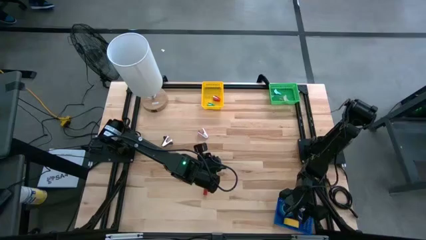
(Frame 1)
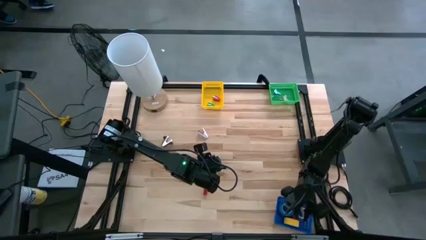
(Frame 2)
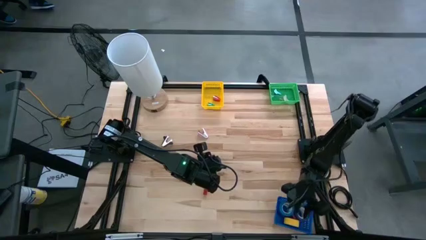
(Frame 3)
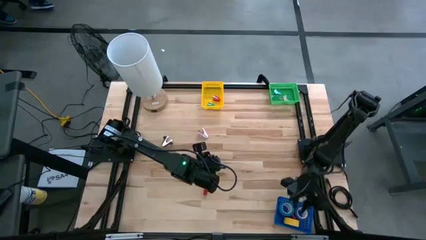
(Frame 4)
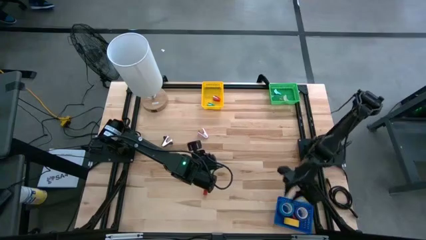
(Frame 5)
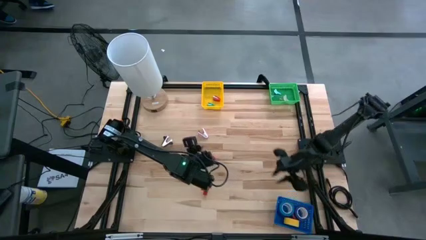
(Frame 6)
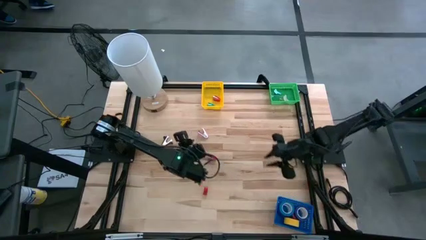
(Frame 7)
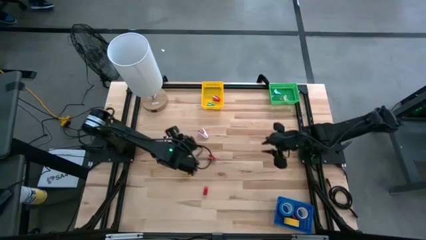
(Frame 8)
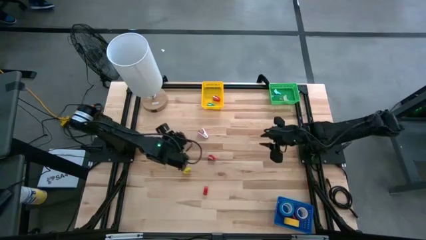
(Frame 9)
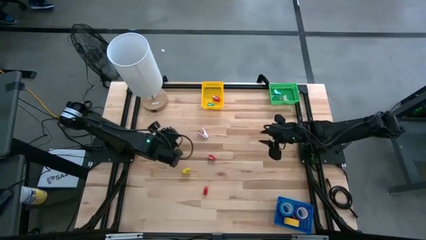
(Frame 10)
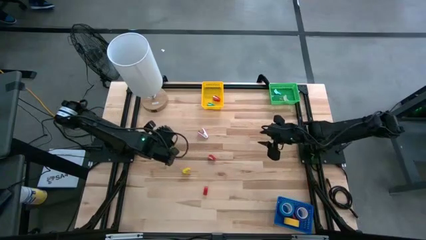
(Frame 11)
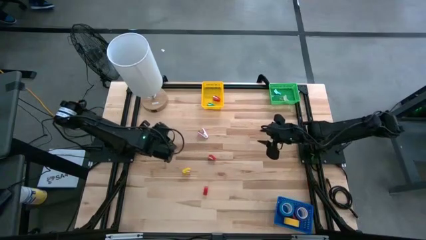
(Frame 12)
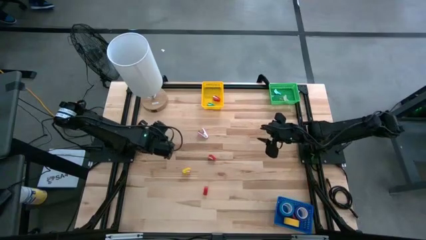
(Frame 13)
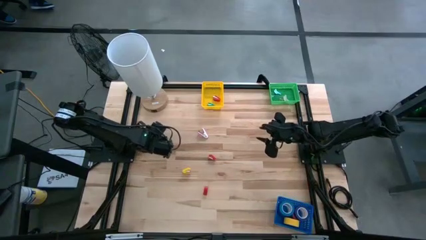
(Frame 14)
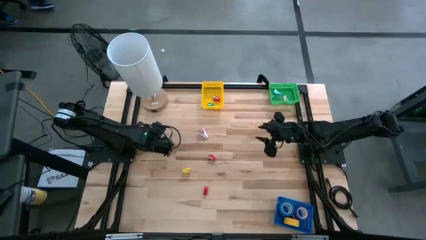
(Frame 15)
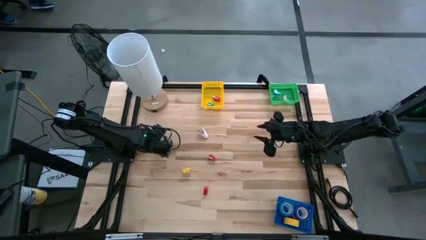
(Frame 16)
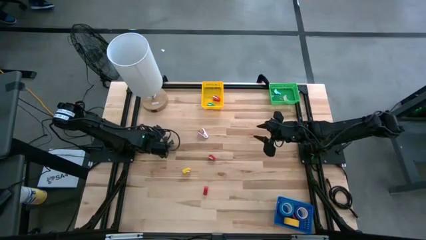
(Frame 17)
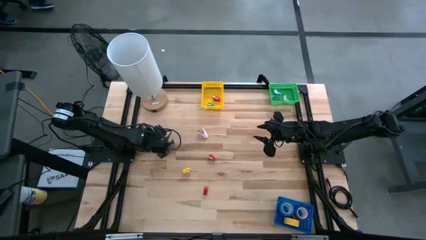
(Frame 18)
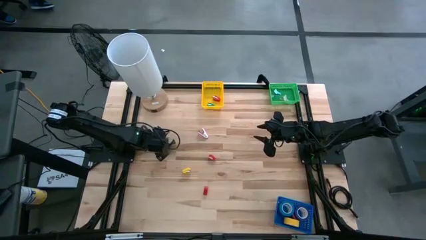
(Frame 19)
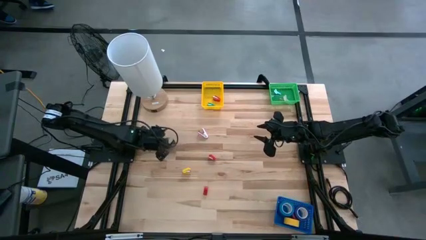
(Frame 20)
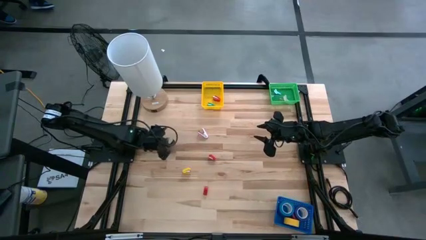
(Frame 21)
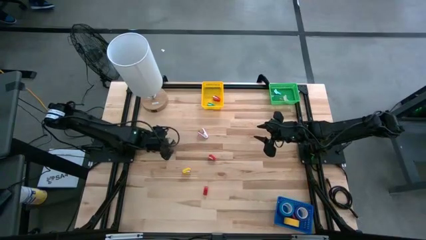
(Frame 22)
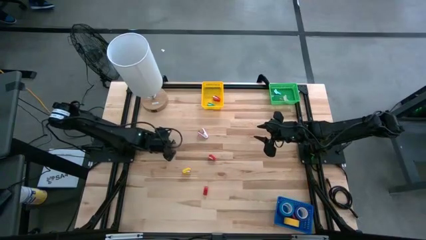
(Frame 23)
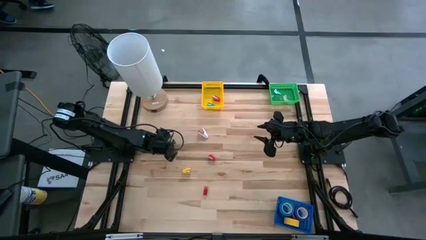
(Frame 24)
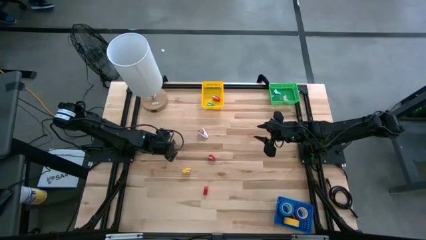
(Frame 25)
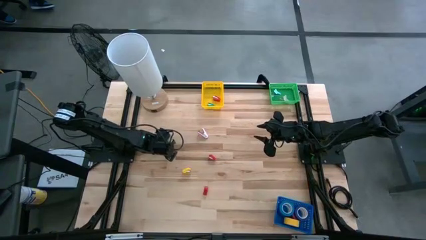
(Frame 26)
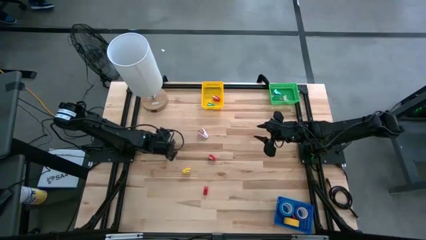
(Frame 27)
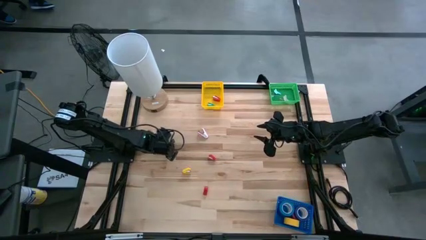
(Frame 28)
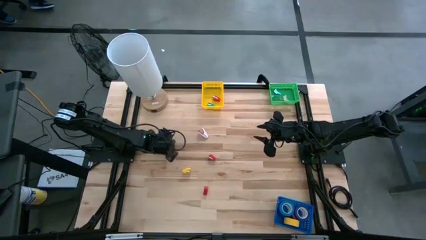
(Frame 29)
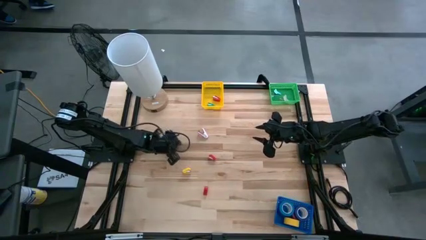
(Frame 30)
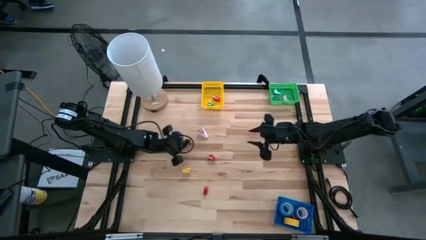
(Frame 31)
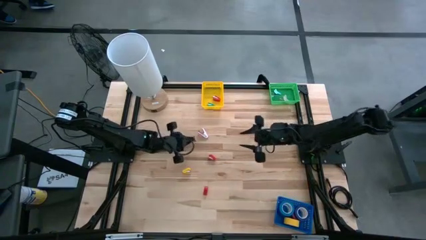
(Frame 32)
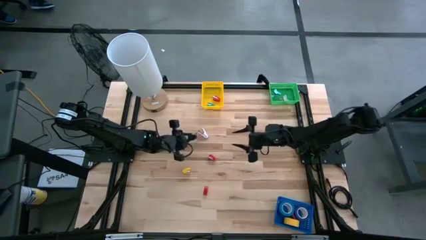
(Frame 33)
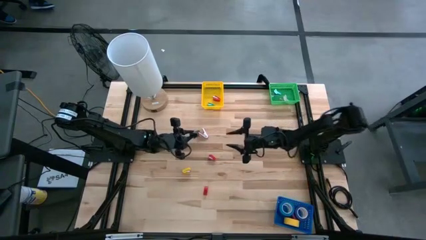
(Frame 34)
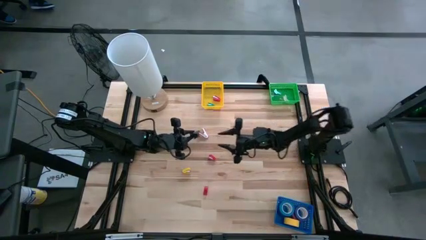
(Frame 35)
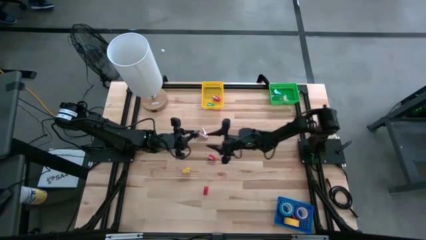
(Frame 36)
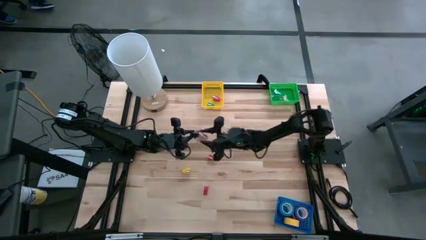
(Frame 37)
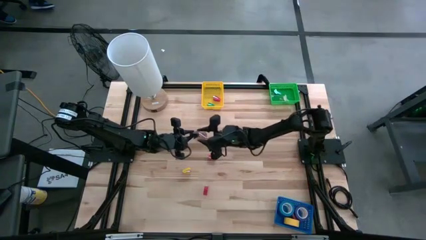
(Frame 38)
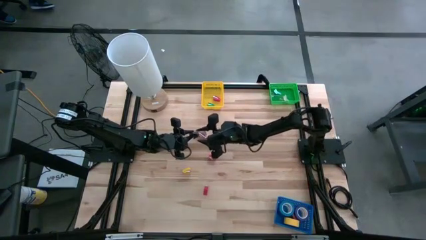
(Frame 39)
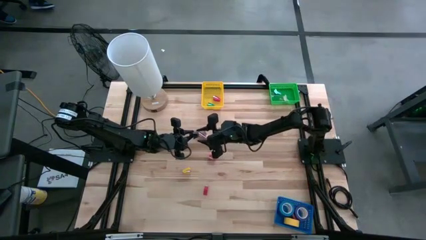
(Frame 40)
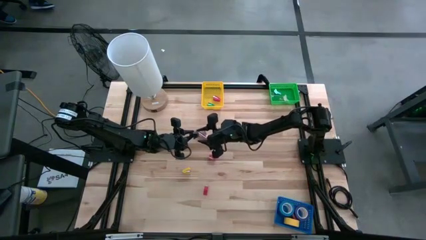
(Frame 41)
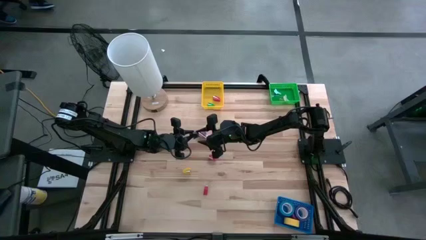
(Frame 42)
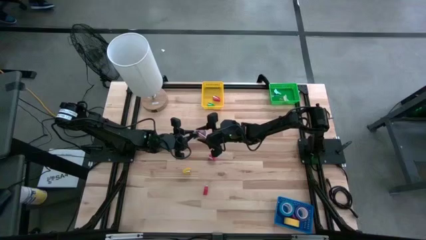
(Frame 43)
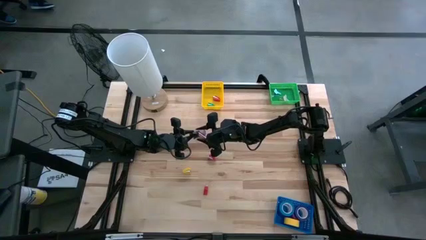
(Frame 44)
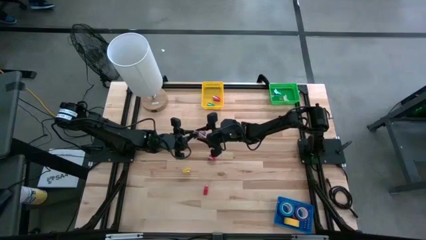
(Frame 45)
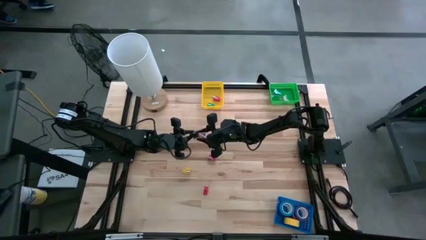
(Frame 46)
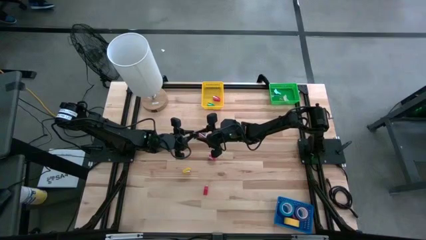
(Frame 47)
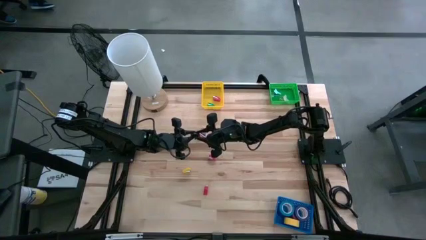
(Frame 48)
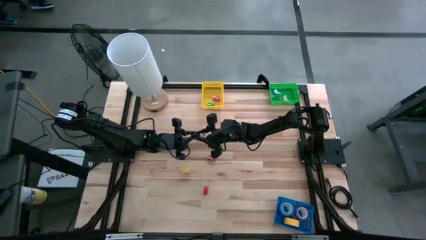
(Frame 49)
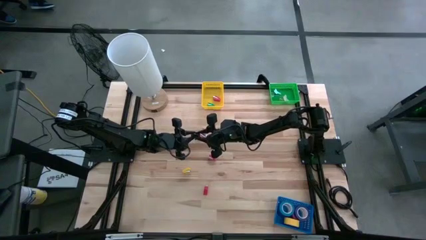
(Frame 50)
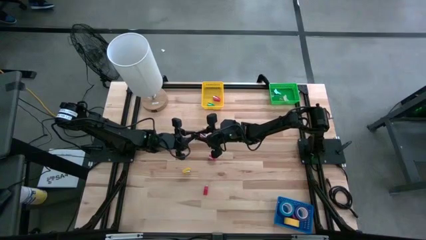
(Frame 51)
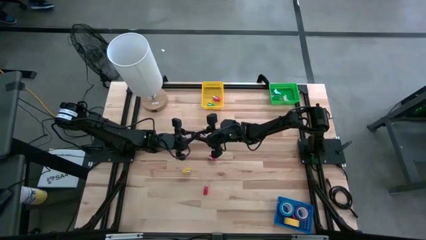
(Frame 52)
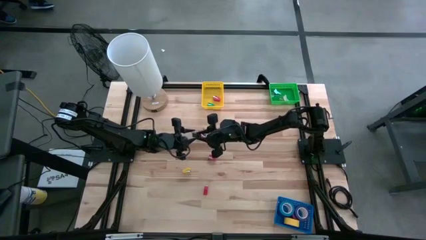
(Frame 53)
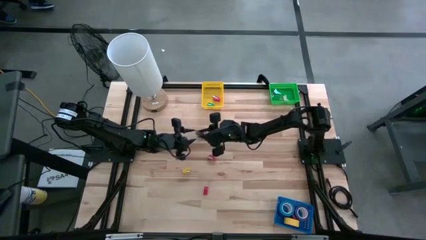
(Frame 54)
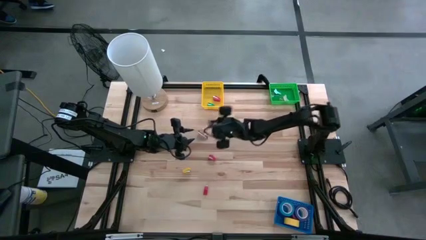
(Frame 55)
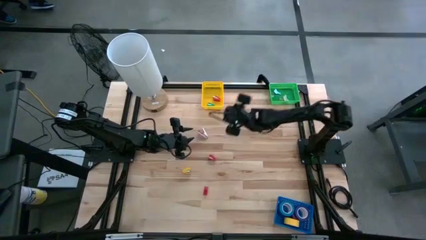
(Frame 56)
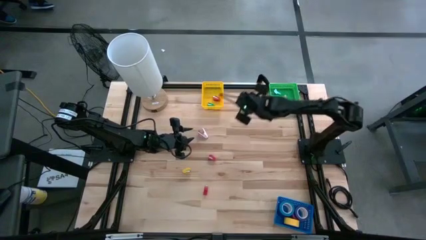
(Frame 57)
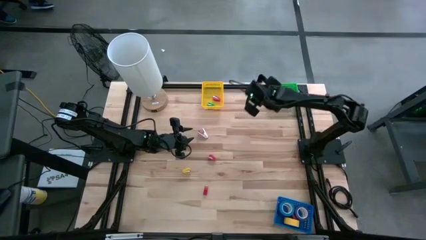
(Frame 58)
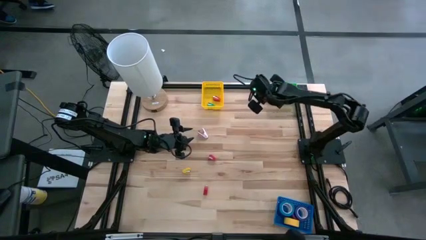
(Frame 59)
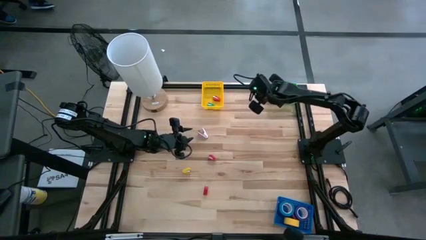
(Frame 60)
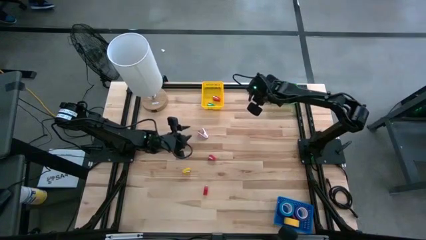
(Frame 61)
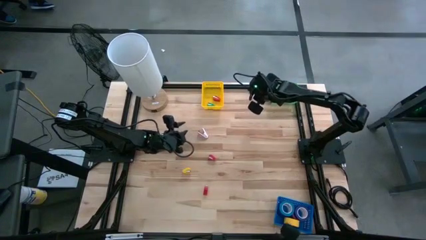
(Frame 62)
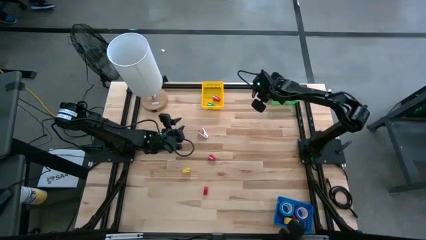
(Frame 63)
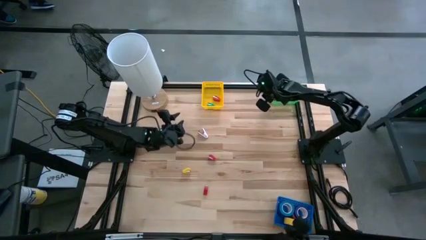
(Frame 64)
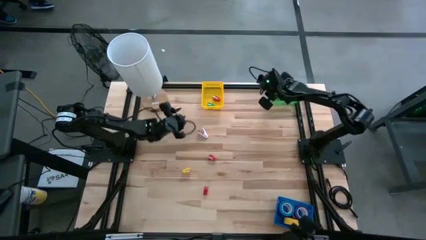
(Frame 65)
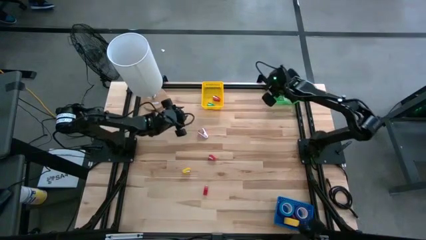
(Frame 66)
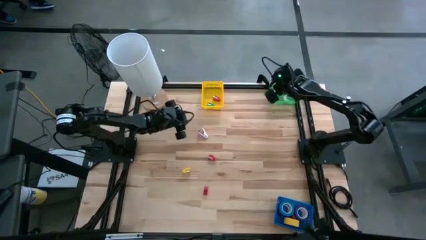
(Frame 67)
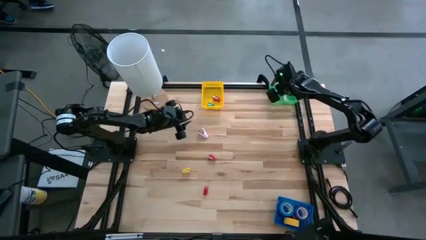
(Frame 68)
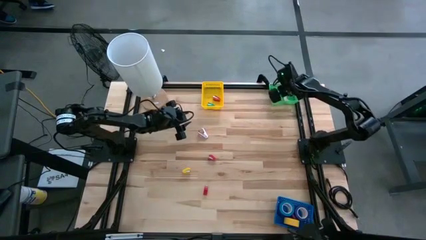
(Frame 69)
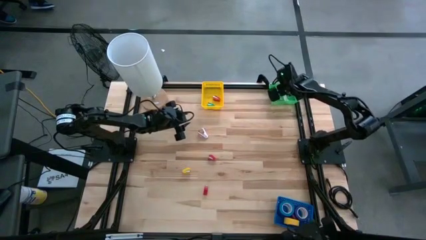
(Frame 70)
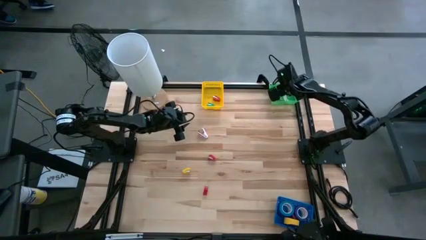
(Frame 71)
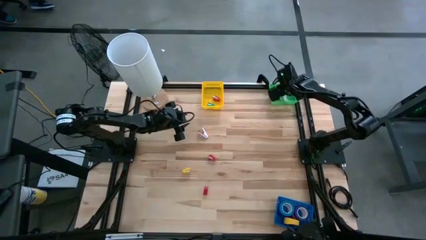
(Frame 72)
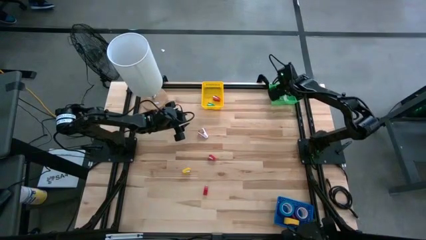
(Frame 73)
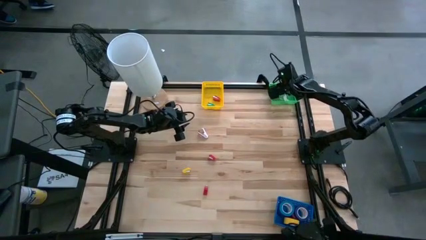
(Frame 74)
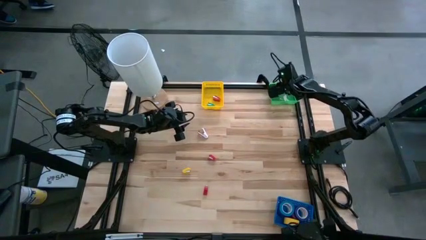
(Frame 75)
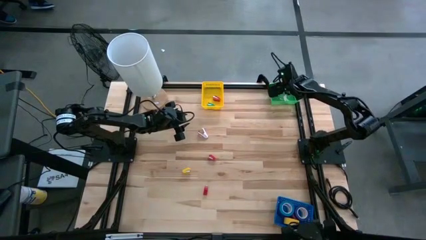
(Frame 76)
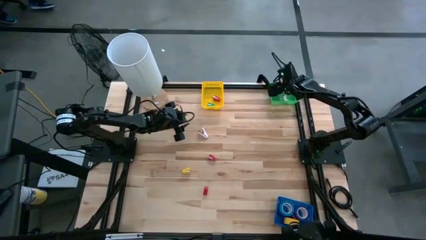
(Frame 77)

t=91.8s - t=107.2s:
Task: Pick and place Stapler, Stapler remover, tape
Put the black staple remover into the green bin

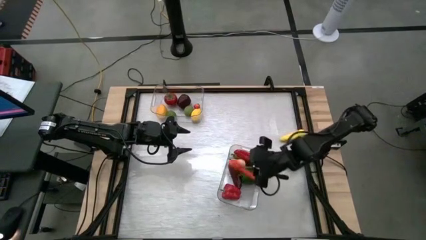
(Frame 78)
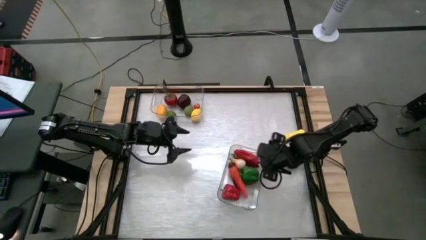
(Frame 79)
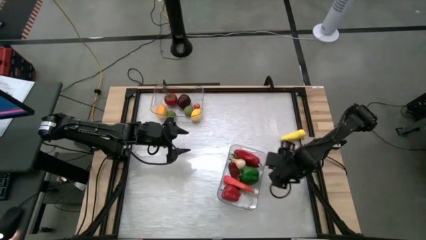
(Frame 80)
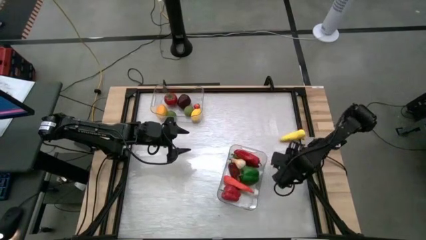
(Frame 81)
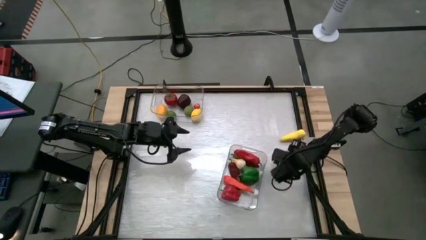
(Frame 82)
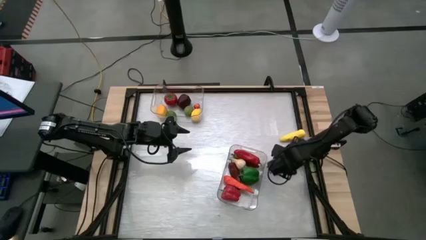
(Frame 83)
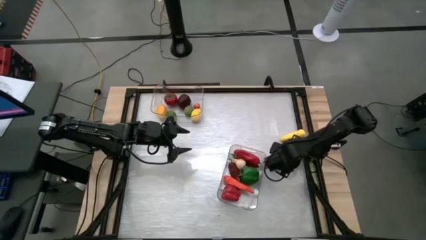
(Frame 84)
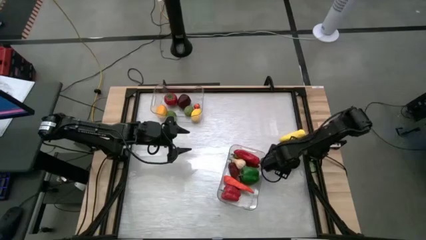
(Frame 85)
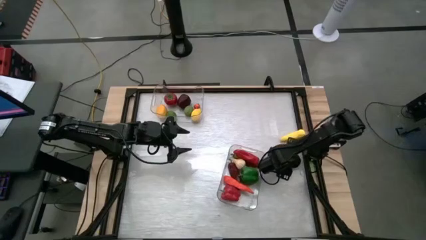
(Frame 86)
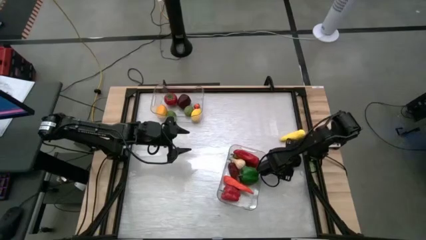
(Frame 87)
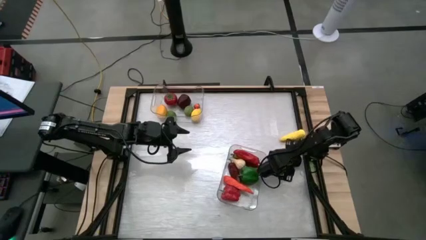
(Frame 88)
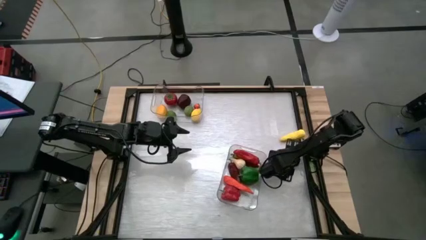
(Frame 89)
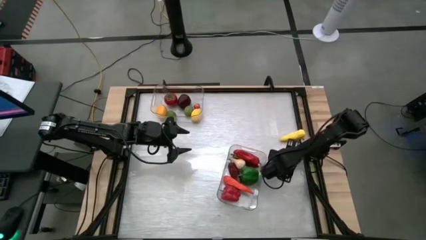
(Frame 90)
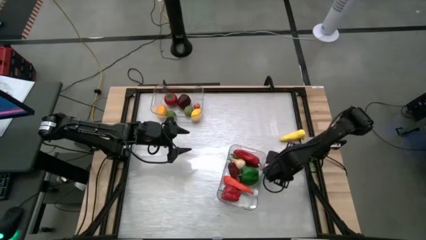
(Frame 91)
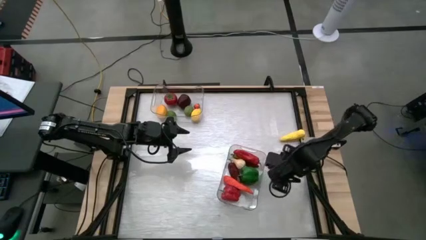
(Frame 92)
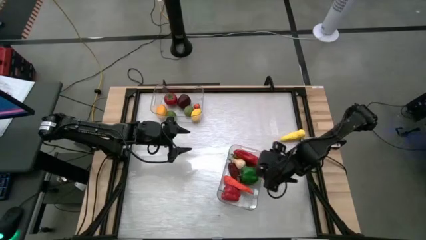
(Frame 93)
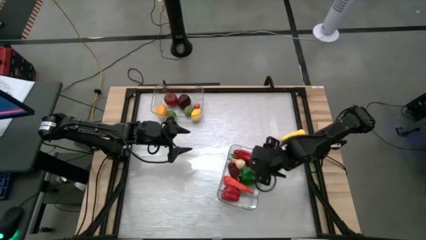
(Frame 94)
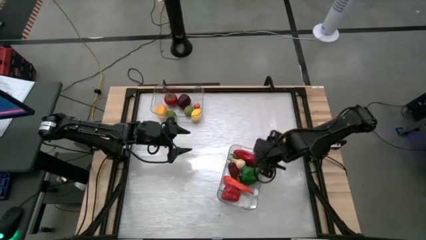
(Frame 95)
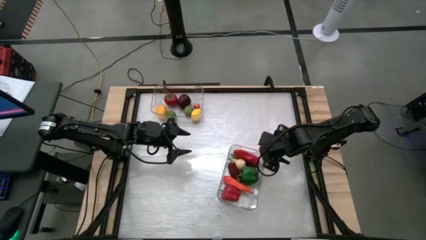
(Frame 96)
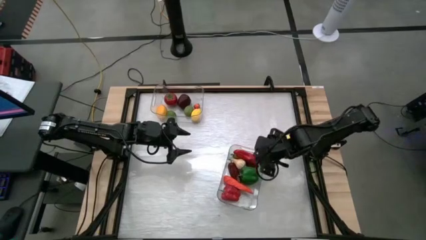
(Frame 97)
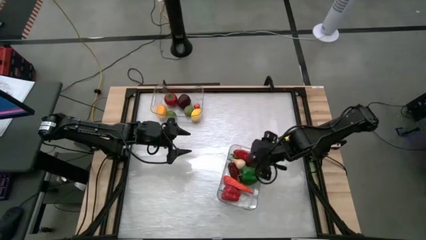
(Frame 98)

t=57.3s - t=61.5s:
Task: Sort produce into baskets
Put the onion into the bottom transparent bin
